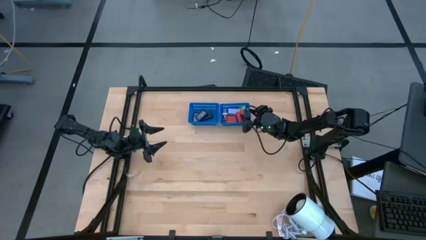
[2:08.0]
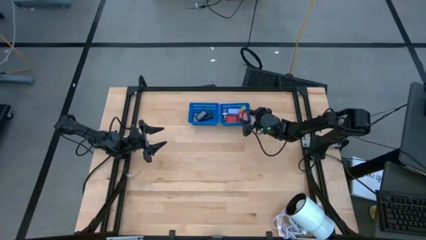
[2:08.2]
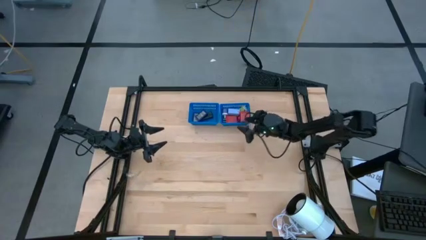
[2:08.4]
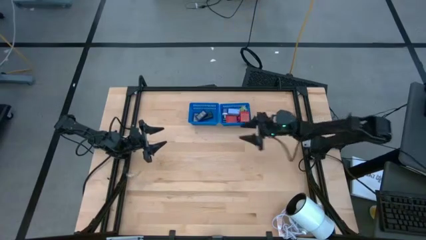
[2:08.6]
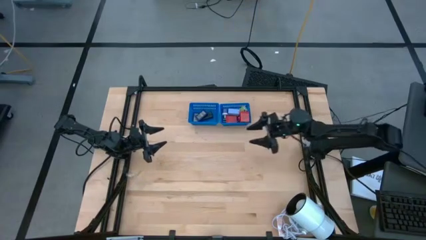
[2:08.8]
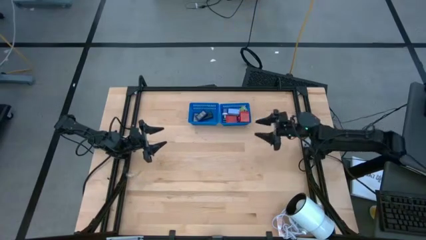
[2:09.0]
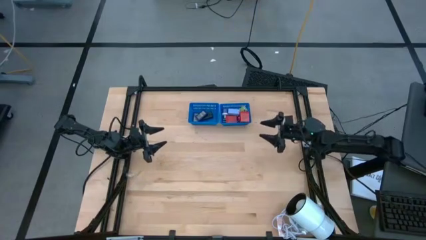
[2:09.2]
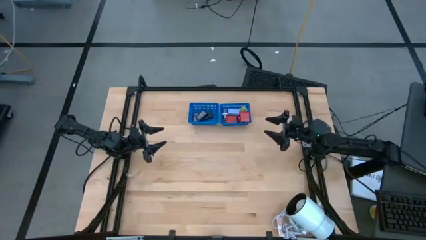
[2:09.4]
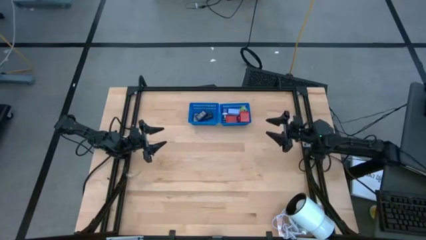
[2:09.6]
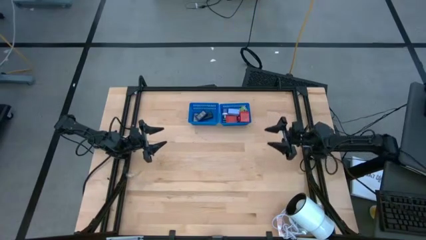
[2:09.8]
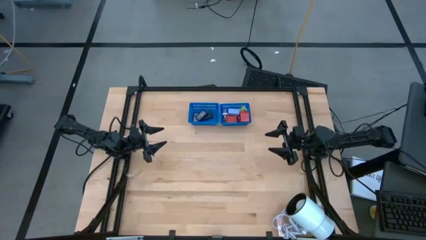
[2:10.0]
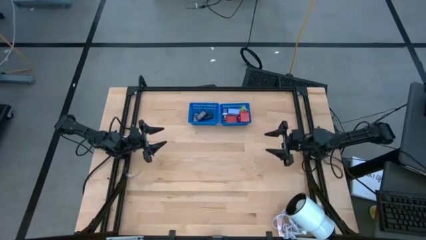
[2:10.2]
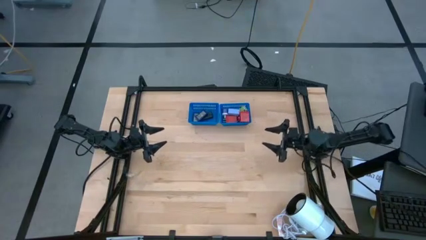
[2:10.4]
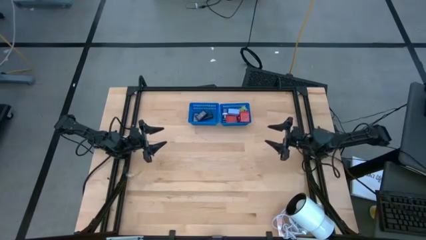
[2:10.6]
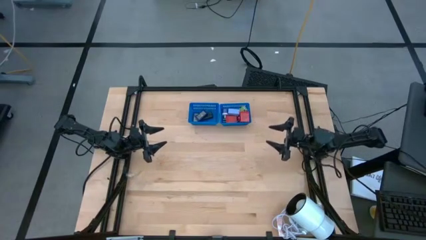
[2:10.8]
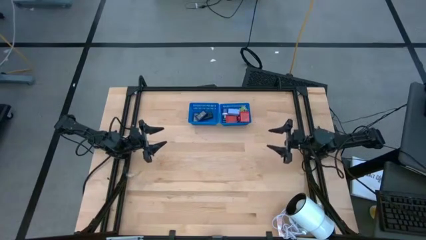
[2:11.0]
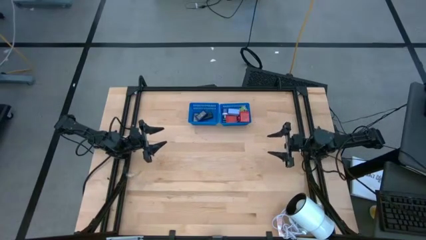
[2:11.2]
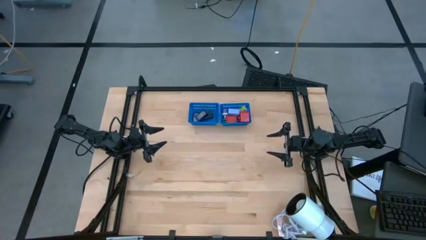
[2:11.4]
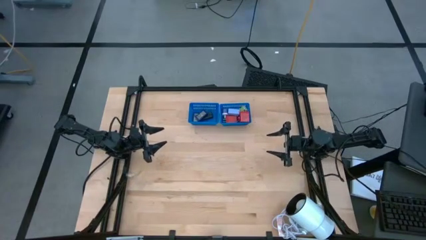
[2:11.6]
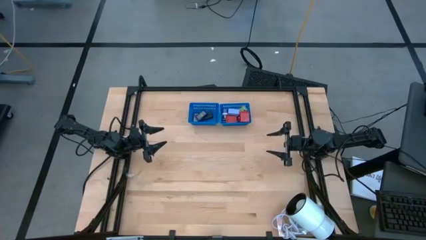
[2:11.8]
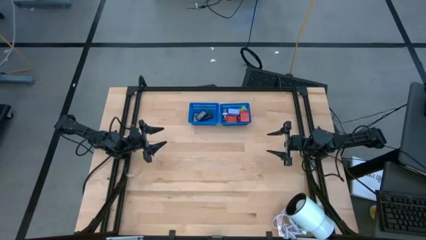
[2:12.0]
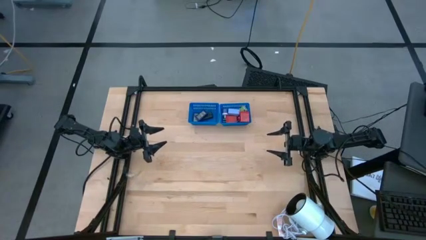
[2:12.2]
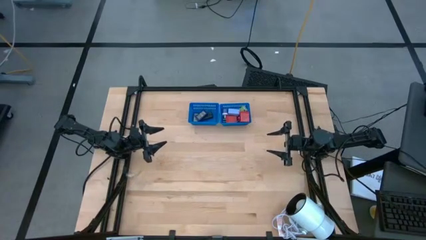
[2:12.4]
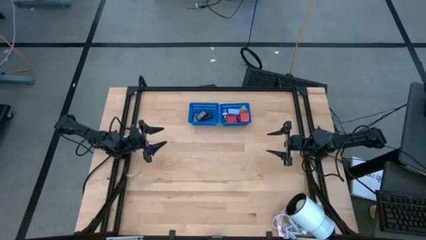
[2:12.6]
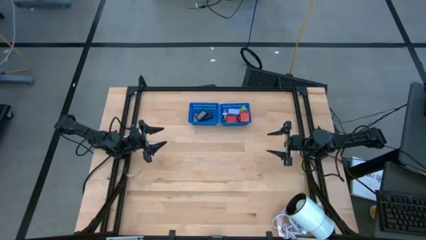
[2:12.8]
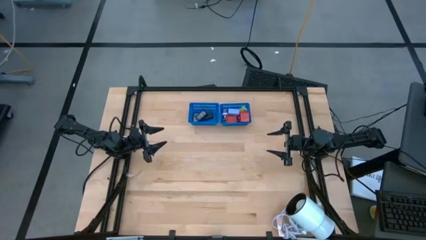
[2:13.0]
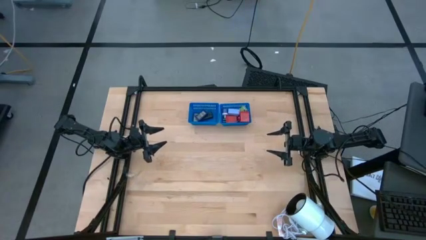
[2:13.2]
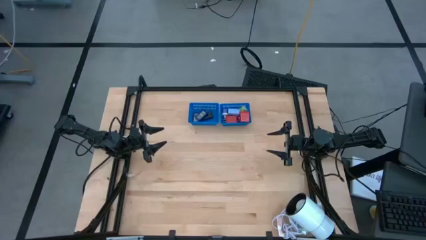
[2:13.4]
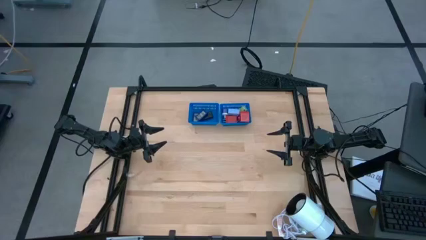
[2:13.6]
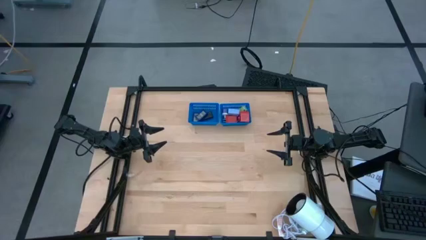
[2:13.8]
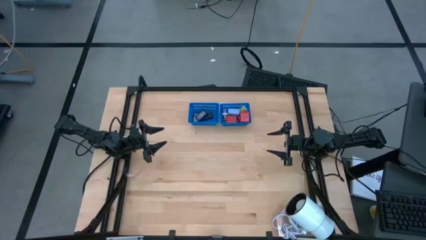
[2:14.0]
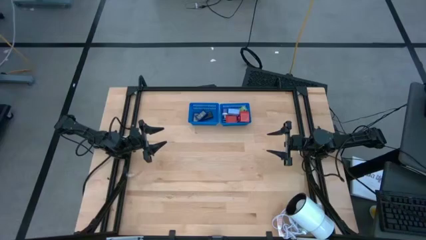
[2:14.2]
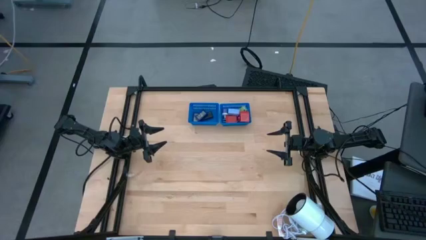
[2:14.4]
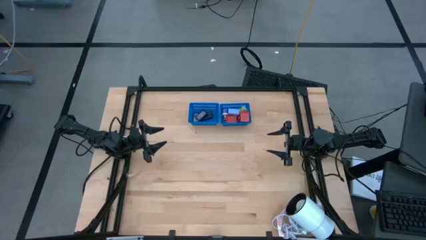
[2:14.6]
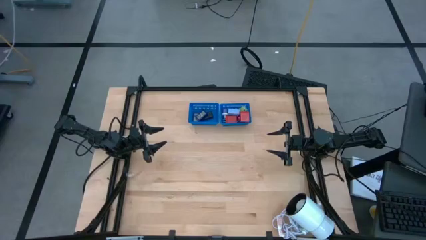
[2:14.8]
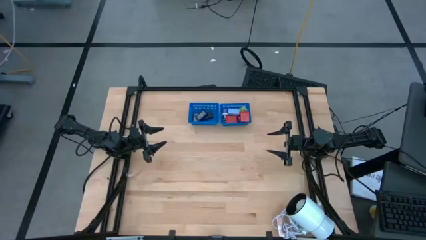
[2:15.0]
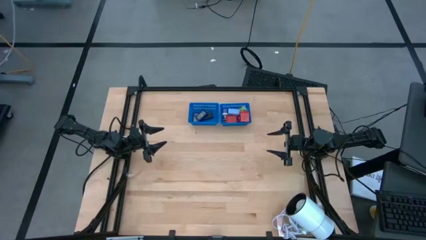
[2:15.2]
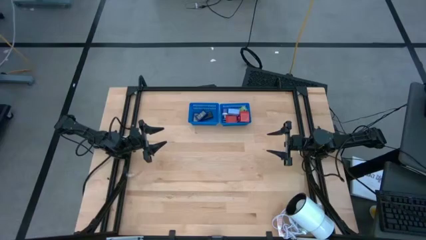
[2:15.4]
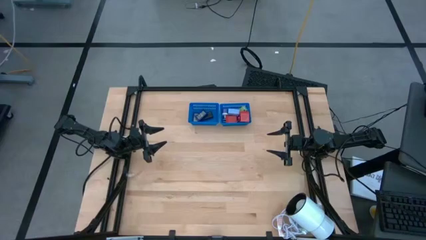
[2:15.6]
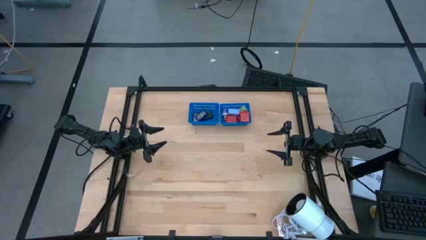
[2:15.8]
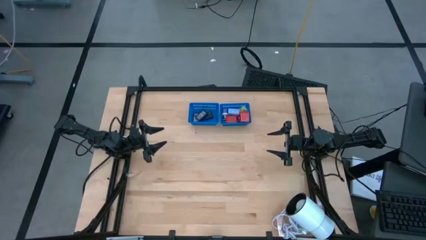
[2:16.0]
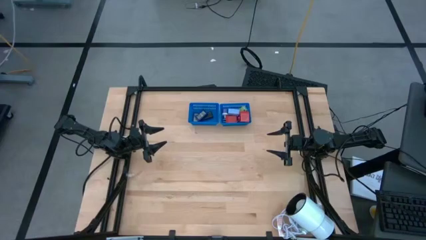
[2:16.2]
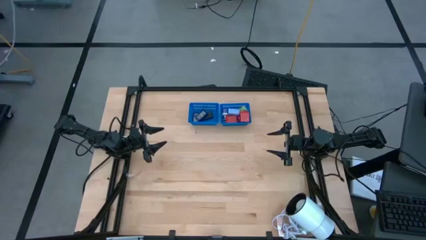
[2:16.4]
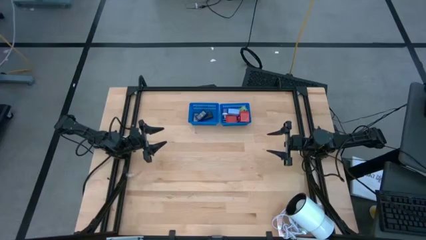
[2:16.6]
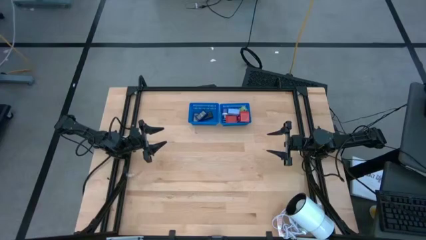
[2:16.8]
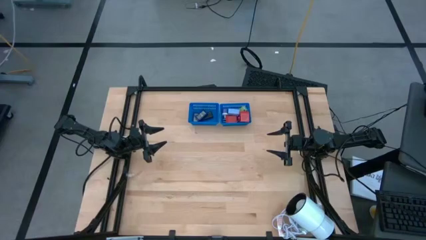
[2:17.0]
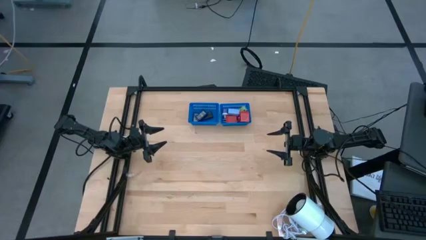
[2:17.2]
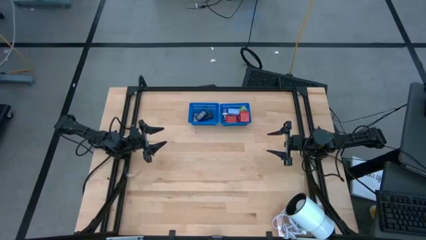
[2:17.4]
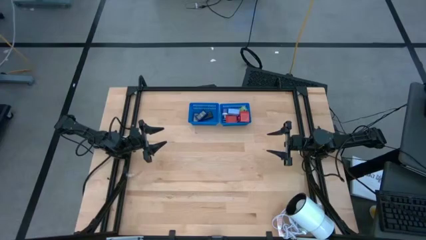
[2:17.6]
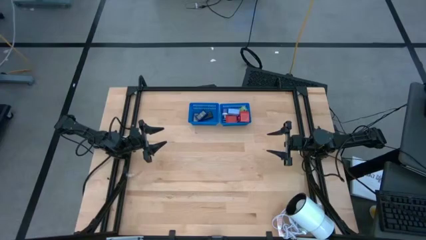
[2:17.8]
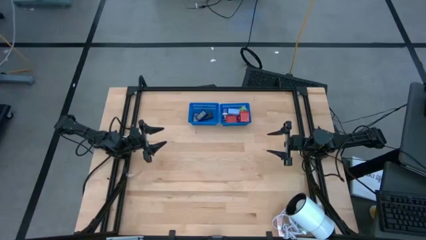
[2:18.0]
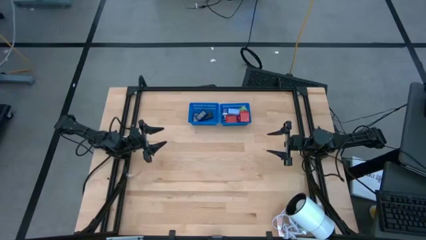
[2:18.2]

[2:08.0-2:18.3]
Task: Pick & Place Office items
Return to Home Position

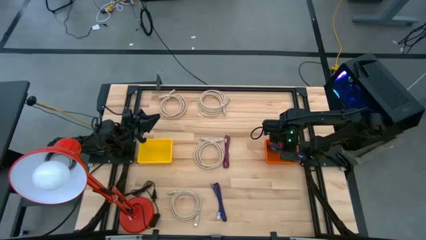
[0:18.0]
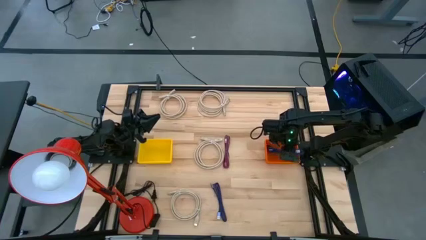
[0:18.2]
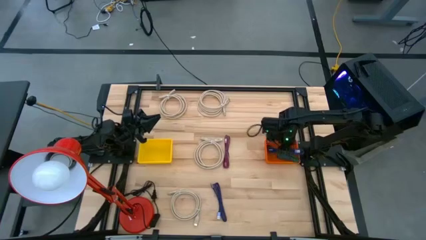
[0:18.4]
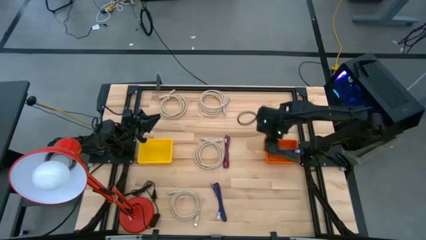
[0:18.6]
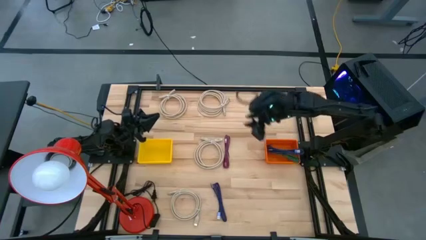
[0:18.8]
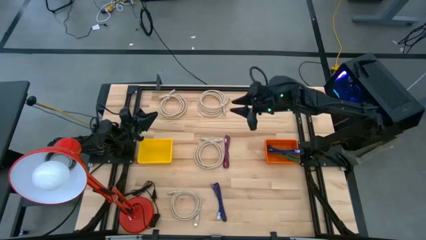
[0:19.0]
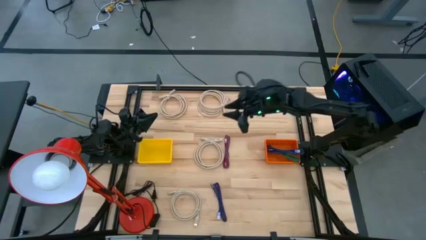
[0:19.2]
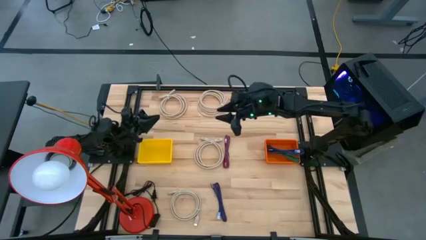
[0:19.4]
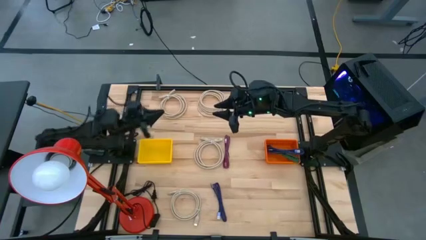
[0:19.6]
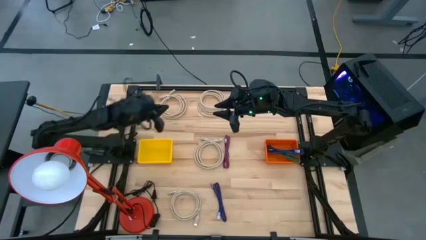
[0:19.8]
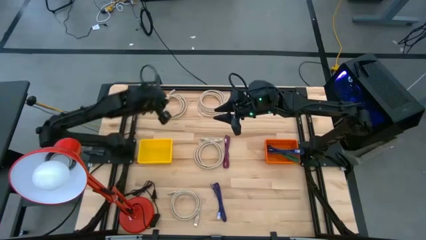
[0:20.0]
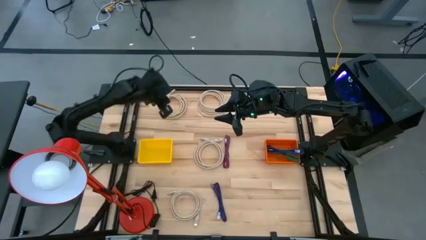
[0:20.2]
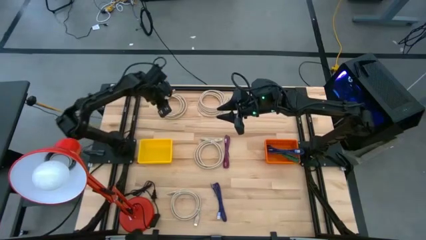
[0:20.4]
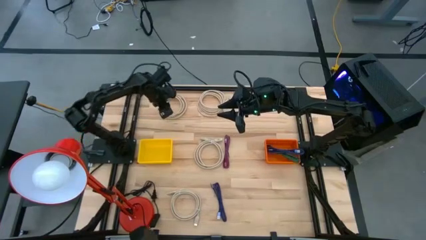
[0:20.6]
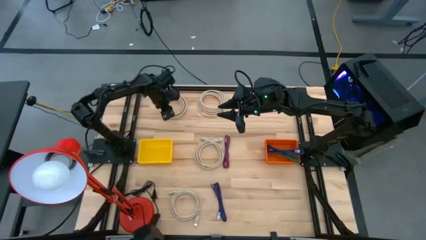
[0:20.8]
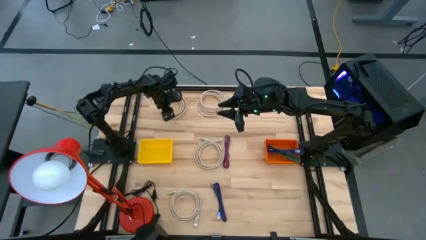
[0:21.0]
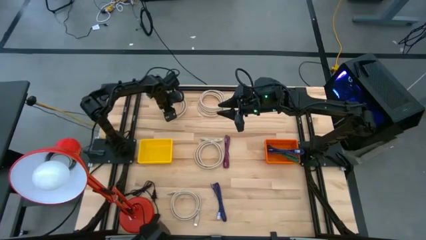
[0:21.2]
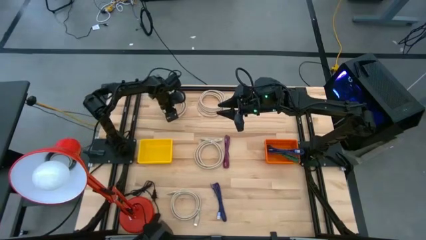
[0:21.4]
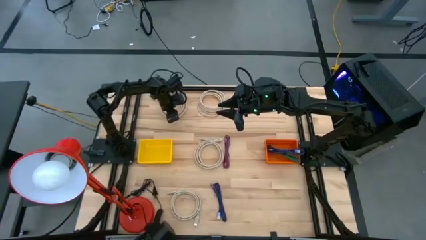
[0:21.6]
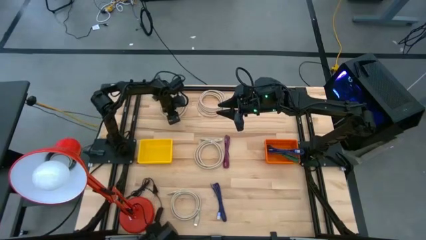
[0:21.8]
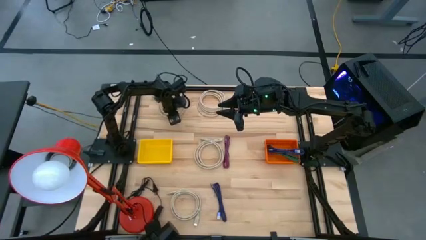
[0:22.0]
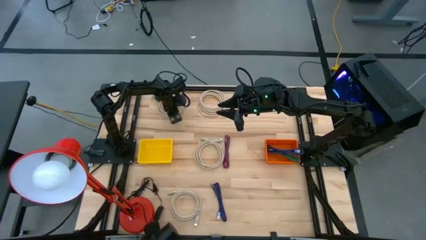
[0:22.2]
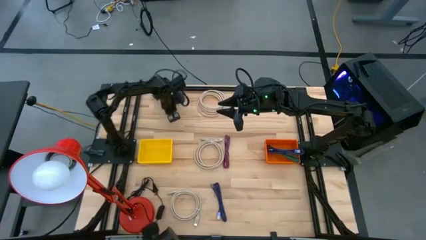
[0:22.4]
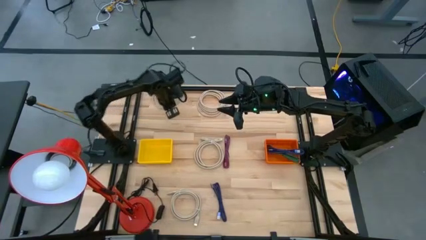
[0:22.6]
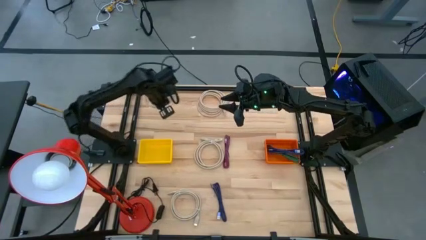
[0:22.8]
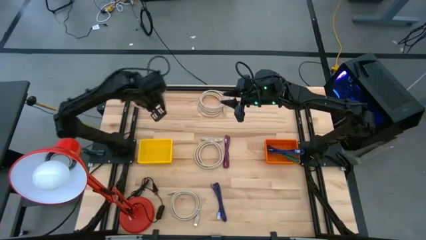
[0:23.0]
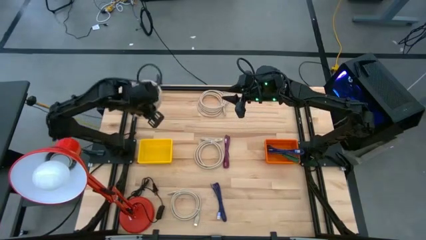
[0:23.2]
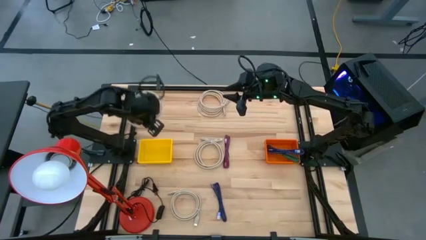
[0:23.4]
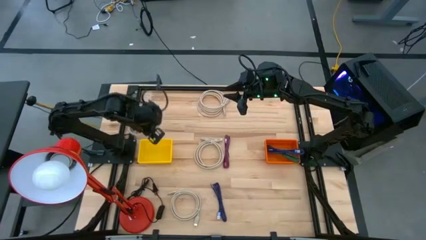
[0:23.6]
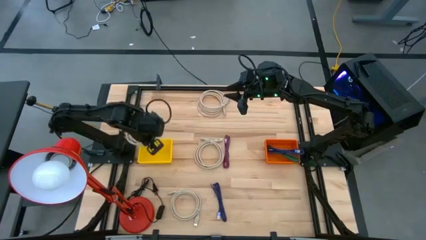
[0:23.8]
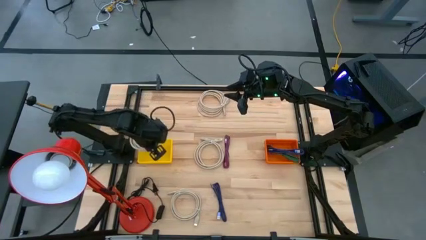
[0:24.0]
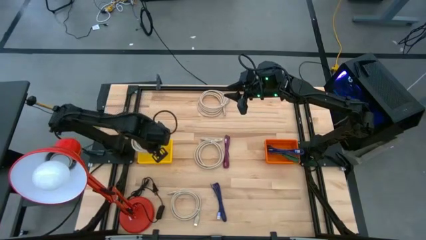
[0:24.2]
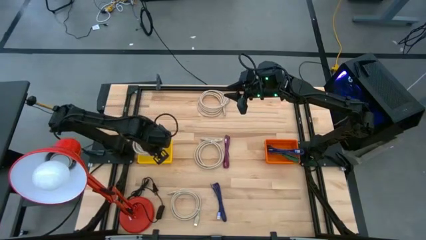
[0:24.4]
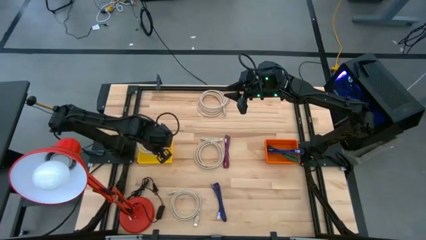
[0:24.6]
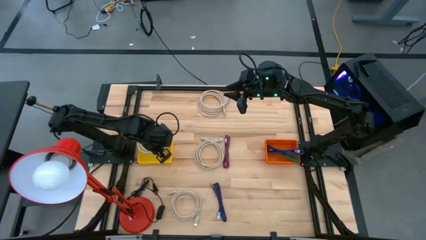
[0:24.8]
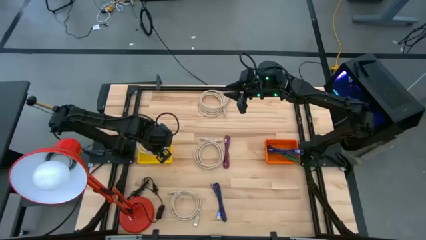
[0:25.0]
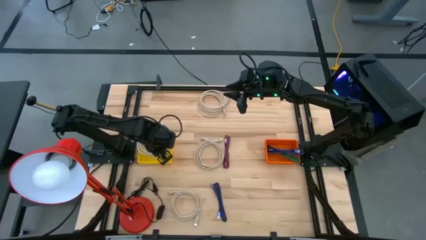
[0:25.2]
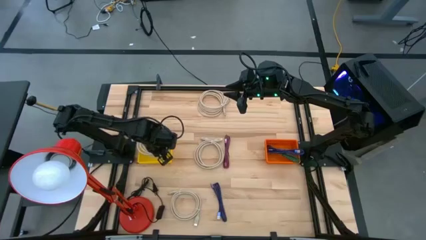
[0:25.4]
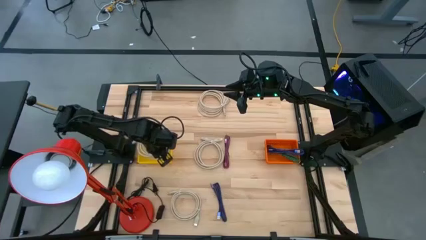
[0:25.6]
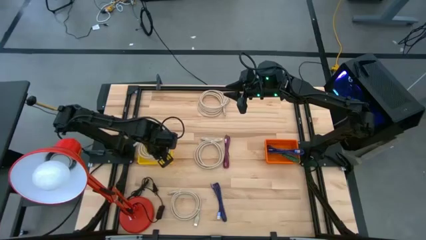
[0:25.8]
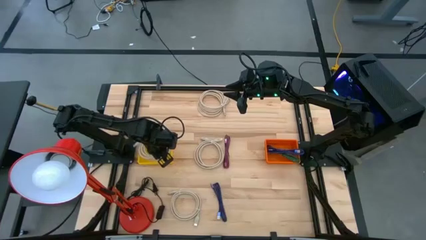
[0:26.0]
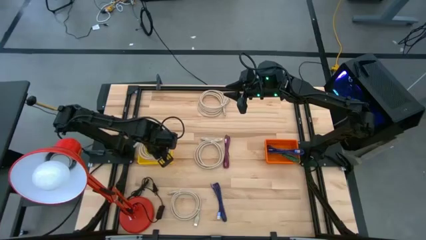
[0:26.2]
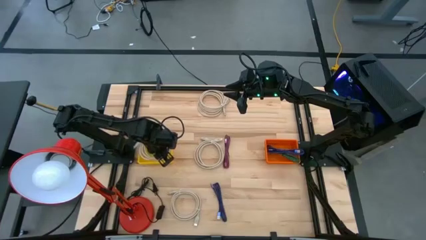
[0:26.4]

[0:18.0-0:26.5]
Task: Pick & Place USB Port
Put the light brown HDMI cable into the yellow bin
